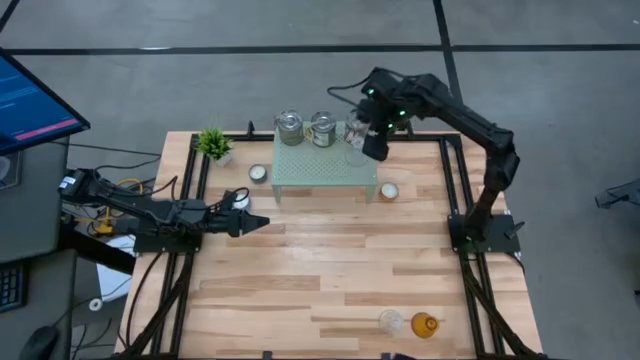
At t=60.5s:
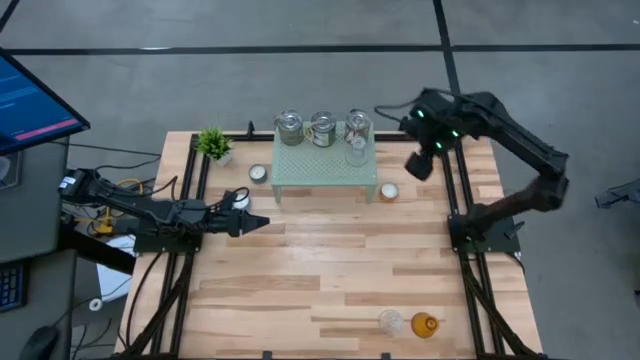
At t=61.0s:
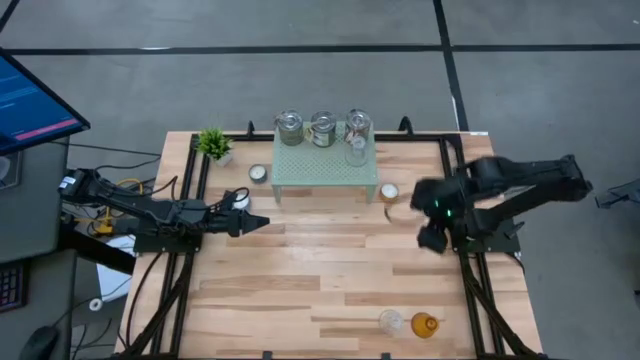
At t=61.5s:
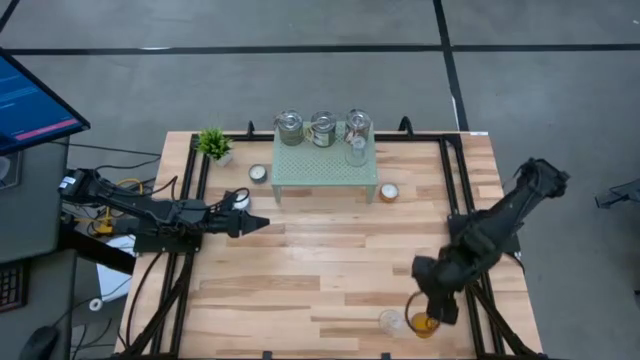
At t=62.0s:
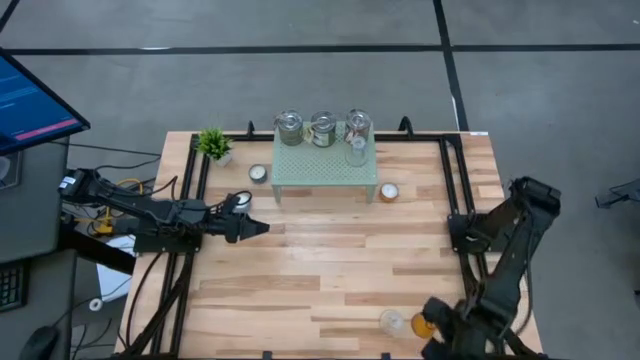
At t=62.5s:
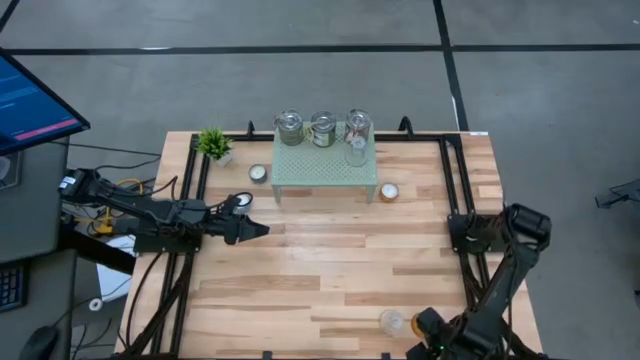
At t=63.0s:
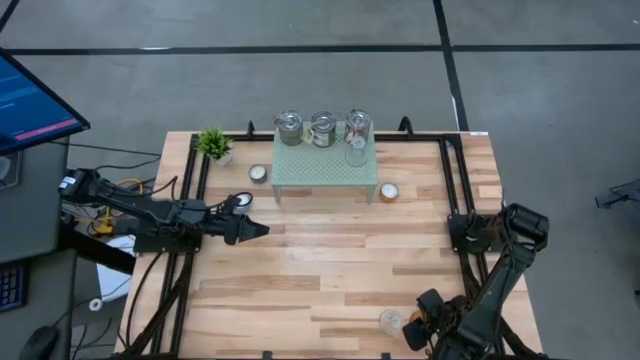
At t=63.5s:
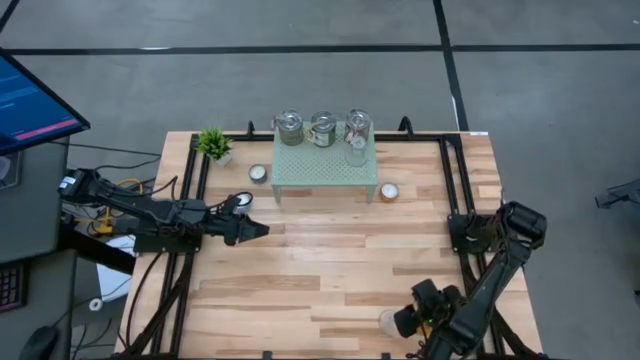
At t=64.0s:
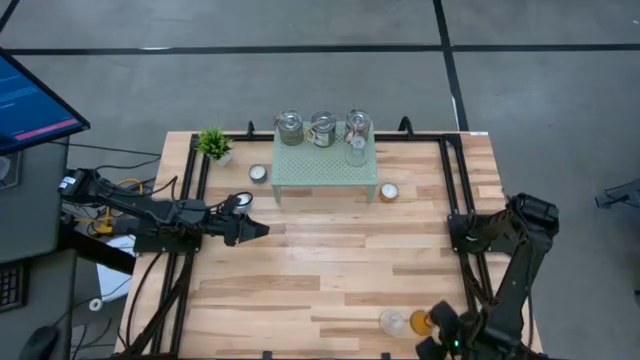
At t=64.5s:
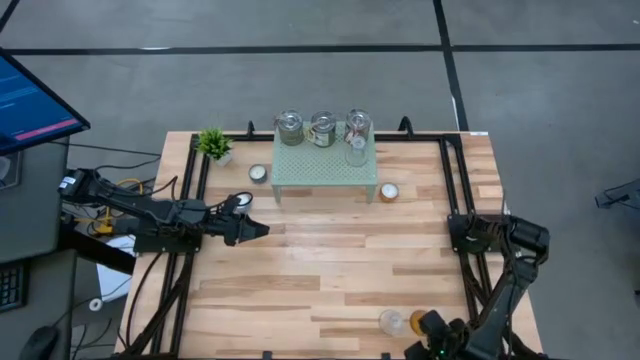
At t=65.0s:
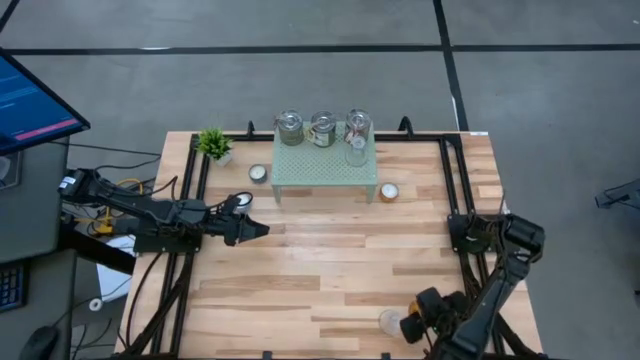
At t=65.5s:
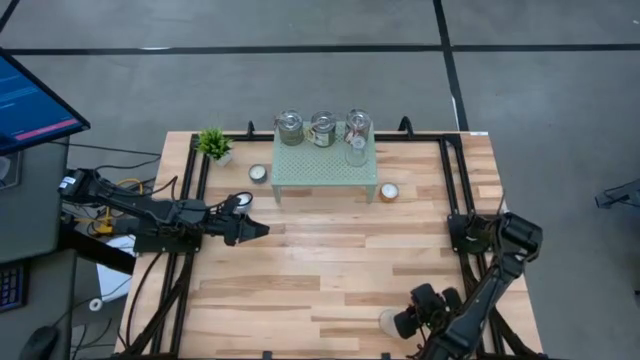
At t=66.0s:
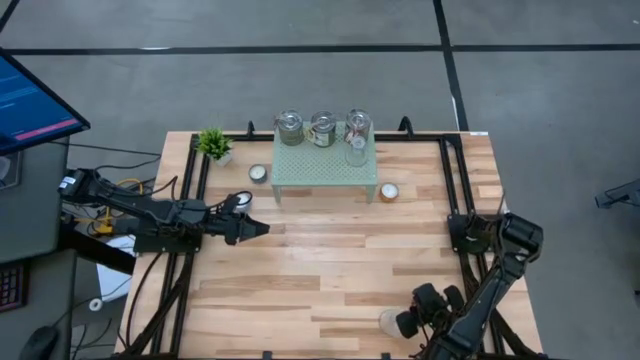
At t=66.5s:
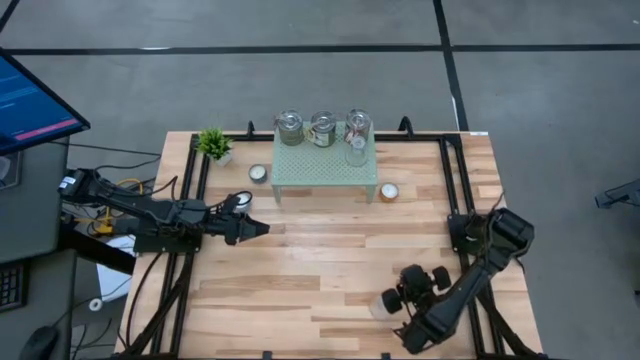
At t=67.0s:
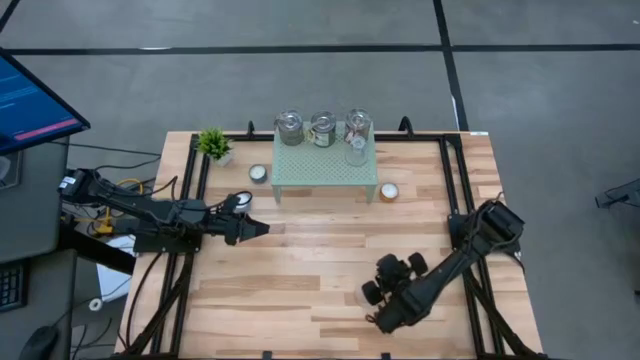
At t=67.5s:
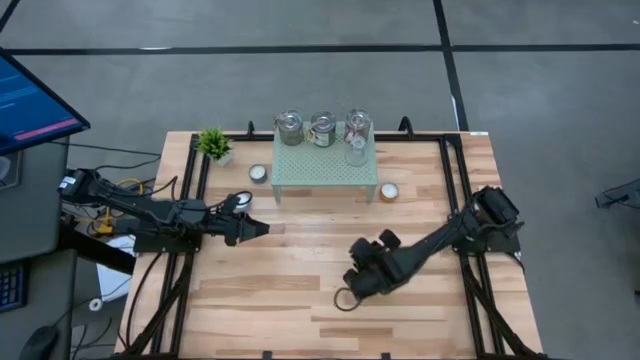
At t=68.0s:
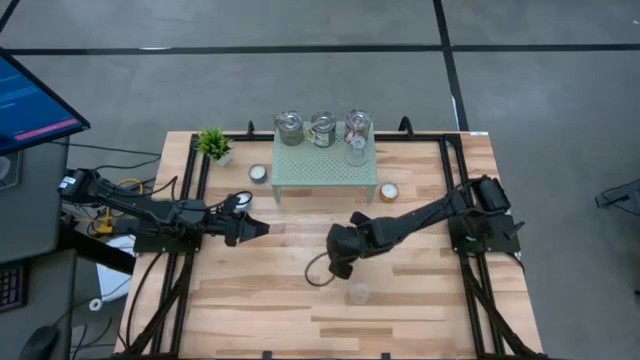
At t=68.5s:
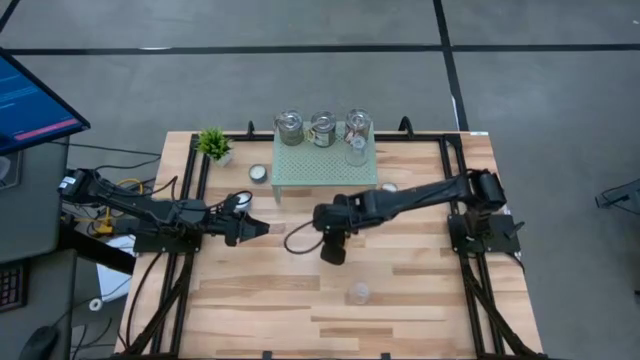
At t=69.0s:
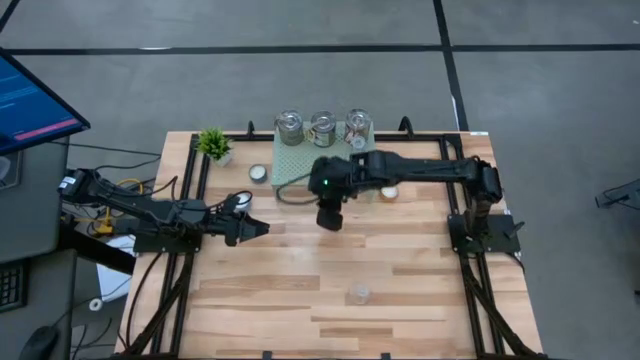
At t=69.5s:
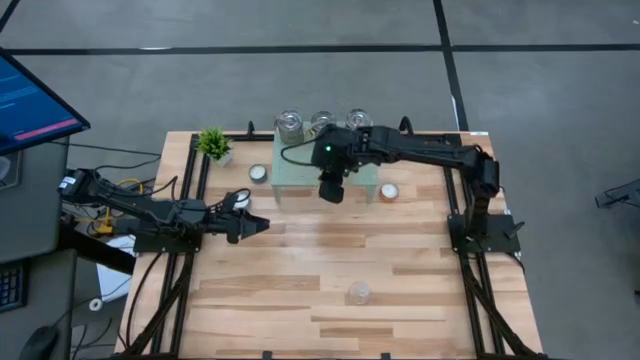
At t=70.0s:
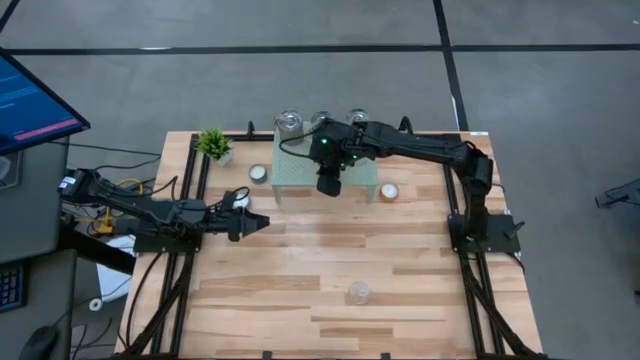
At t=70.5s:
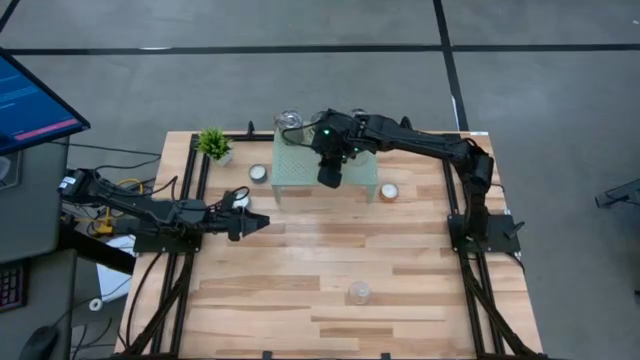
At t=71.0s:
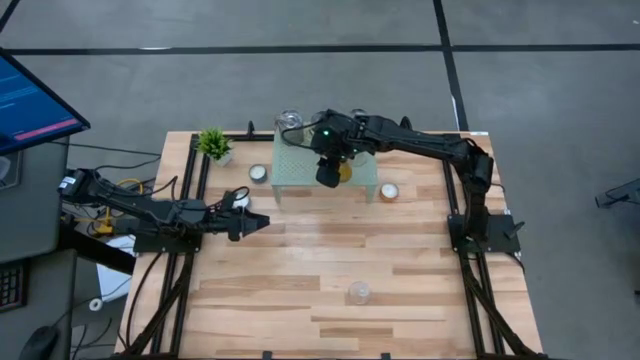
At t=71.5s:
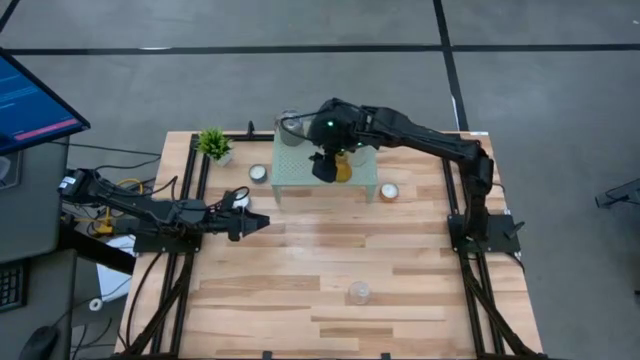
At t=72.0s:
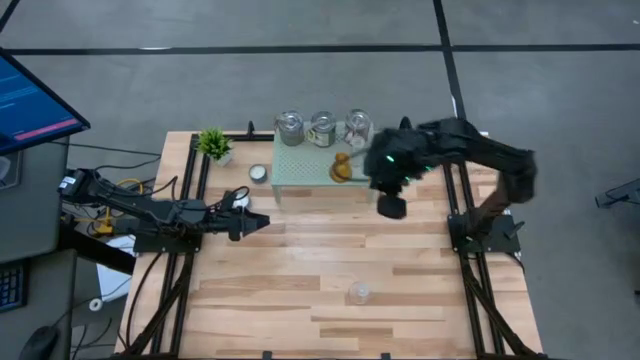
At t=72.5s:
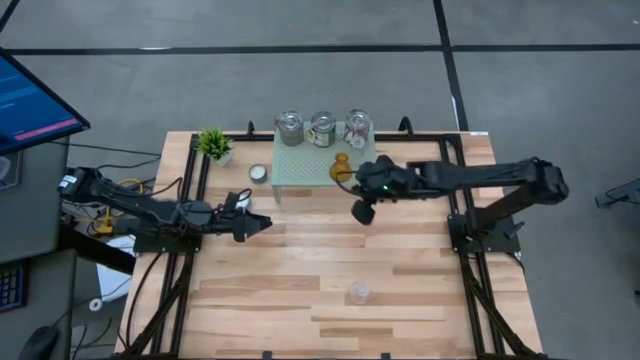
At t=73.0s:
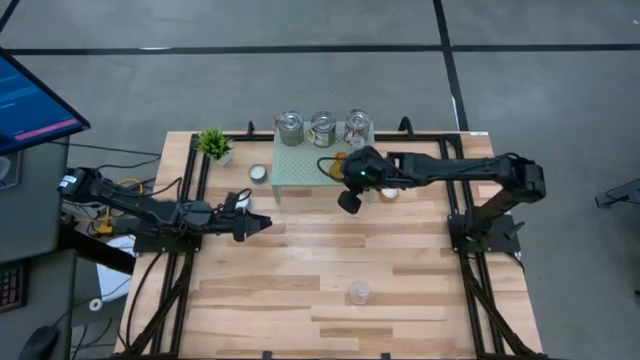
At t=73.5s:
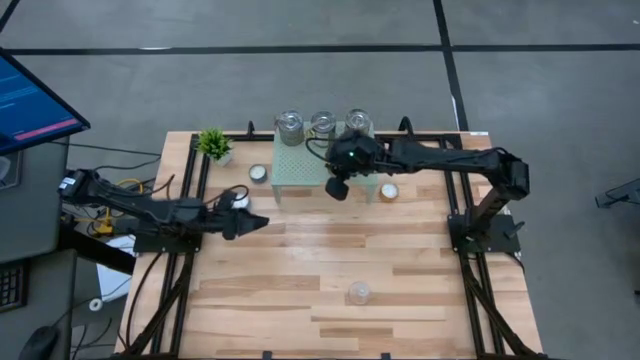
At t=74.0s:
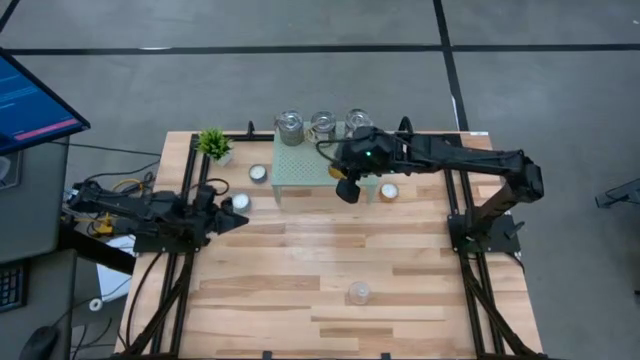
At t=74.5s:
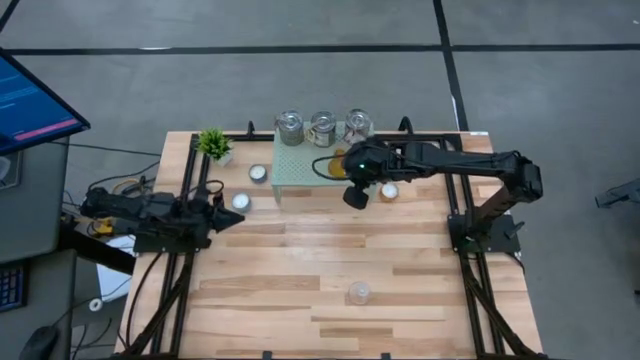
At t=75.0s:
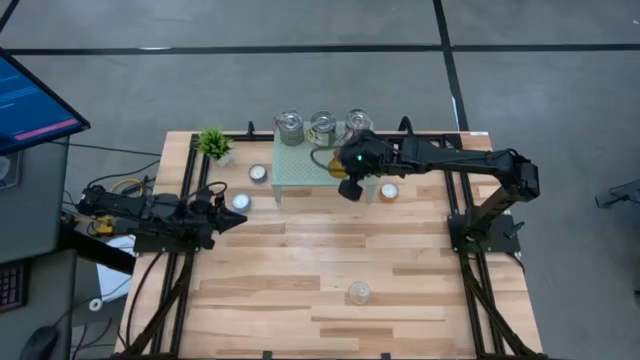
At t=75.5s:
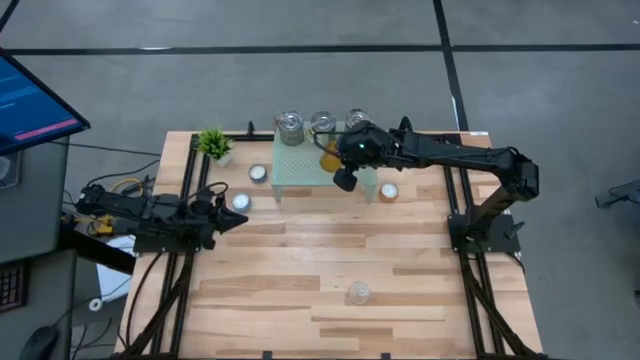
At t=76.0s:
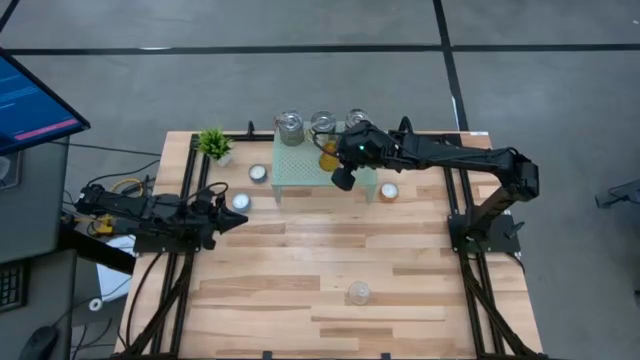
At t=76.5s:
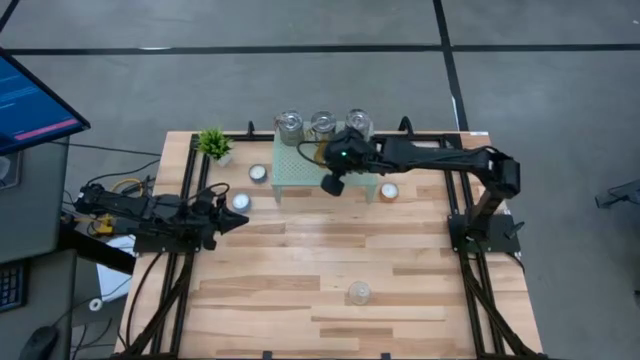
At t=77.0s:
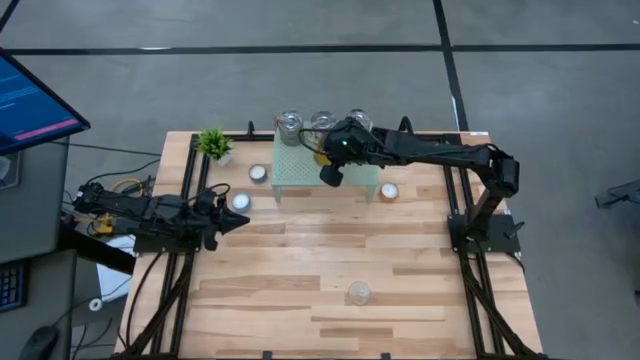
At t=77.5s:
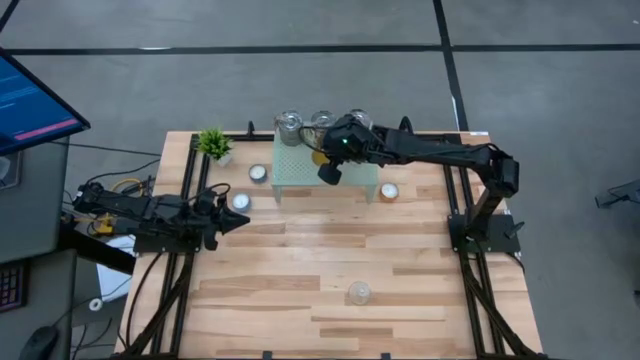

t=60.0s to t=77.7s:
Task: Pick & Place candle stick holders
Put the orange candle holder on the shelf
